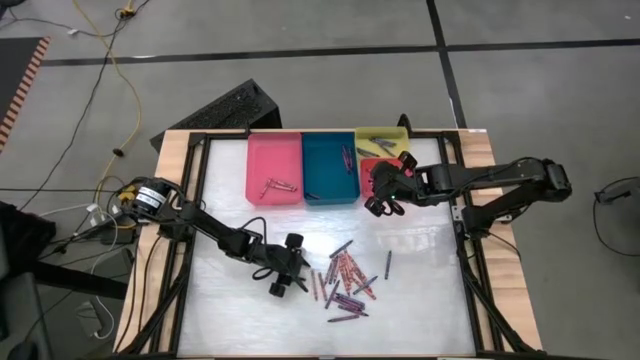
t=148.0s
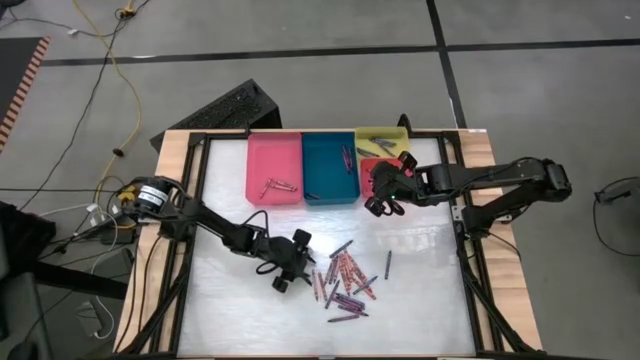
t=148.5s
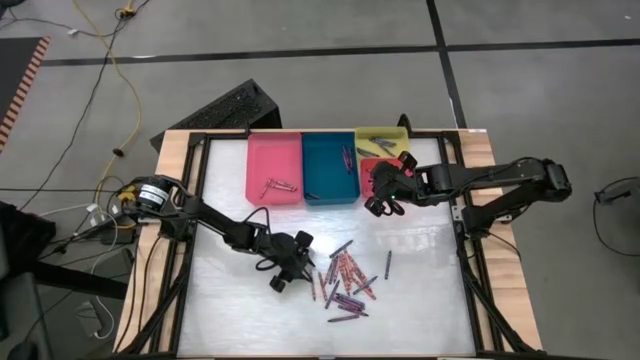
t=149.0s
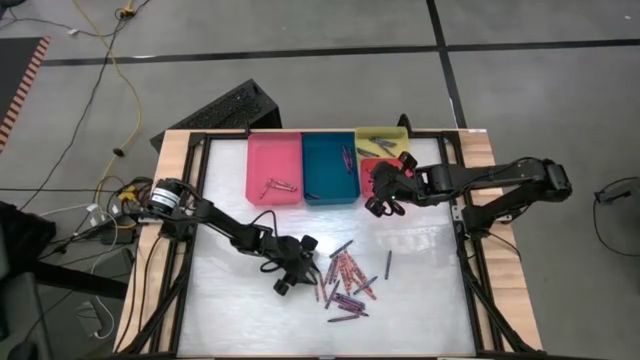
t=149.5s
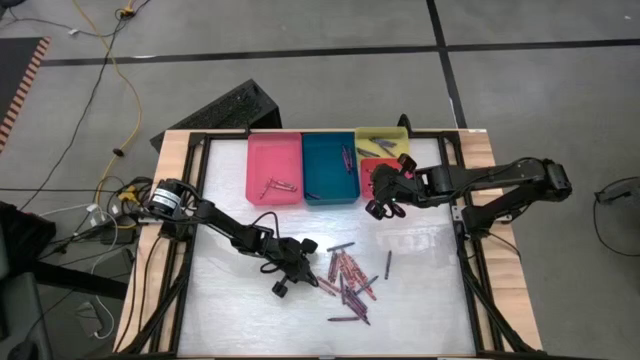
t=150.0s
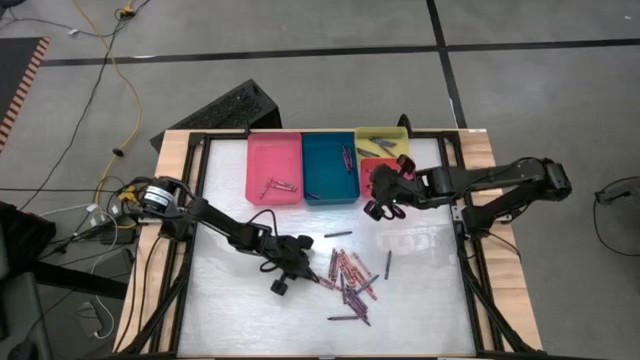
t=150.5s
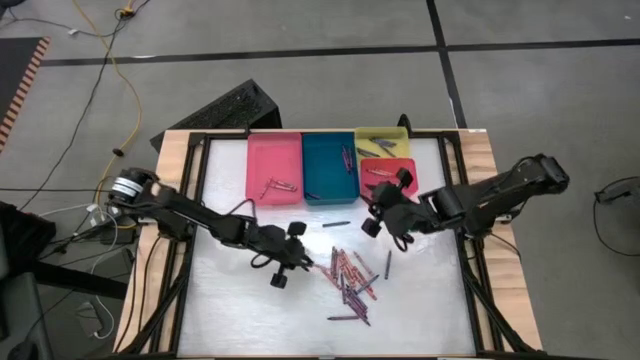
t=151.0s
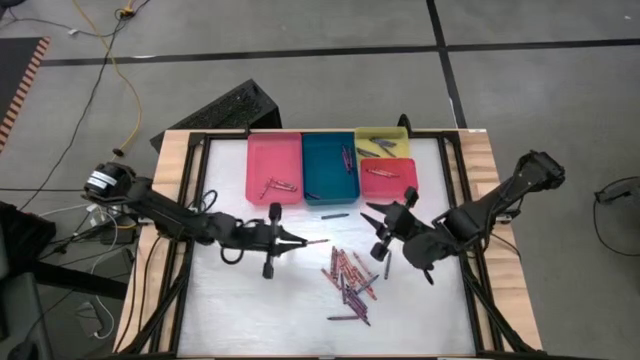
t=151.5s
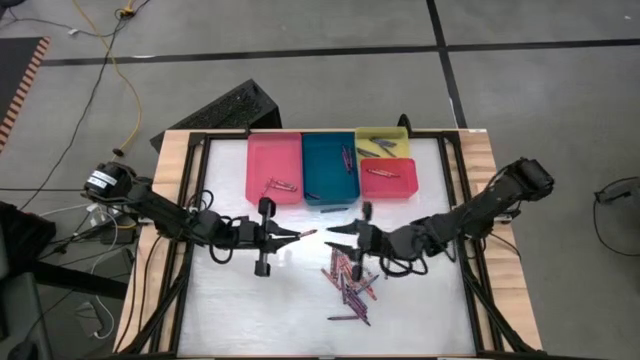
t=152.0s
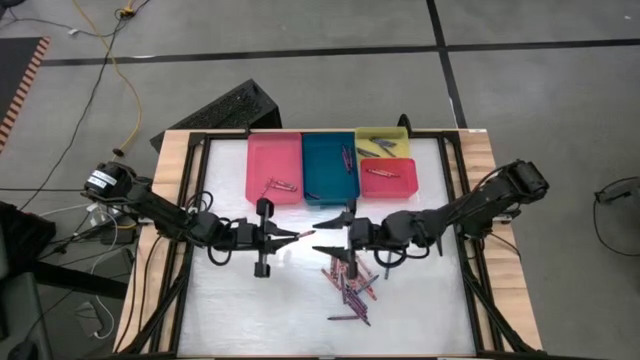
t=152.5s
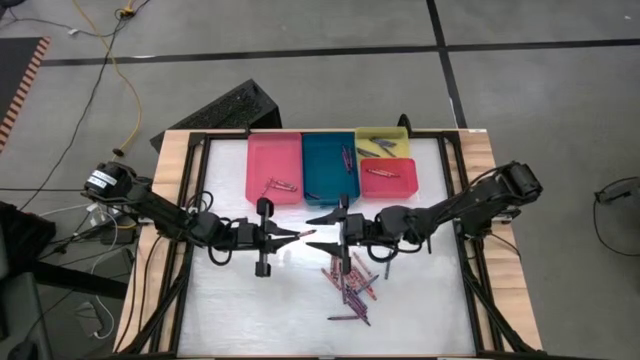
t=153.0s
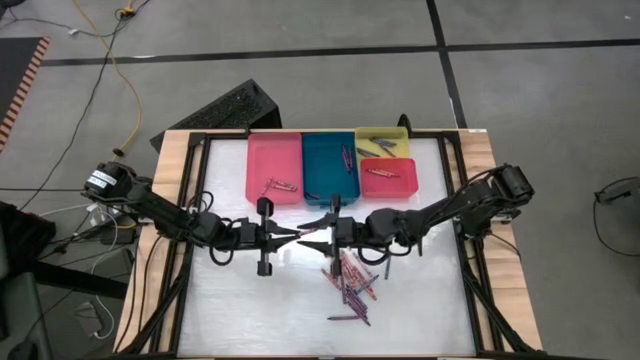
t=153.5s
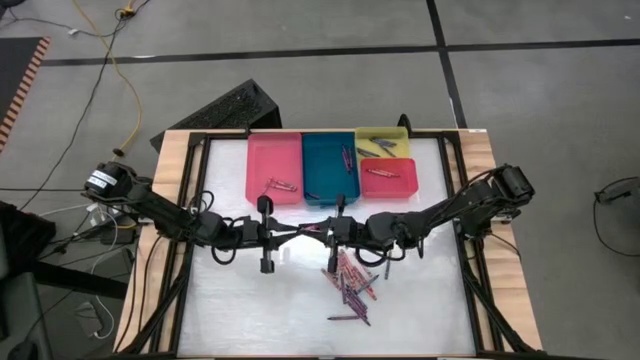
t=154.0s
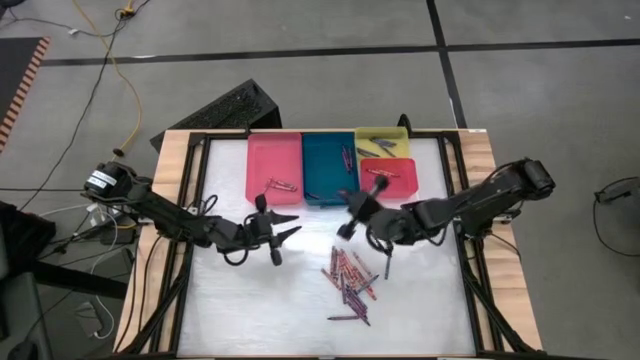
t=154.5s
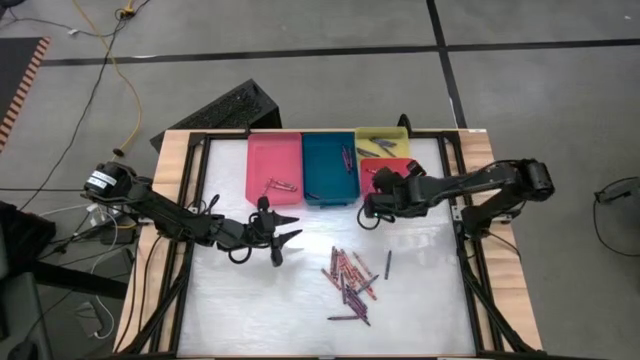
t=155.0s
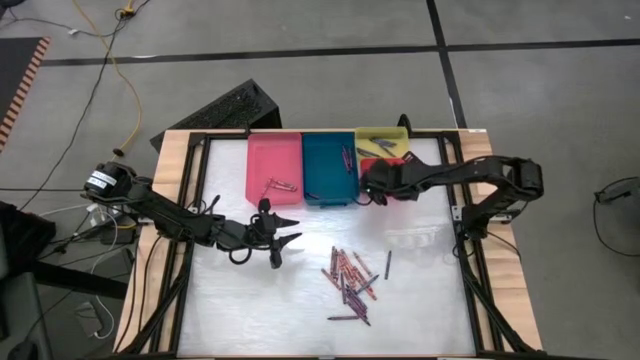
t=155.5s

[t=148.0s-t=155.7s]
Task: Sort crayons
Put the red crayon into the red bin

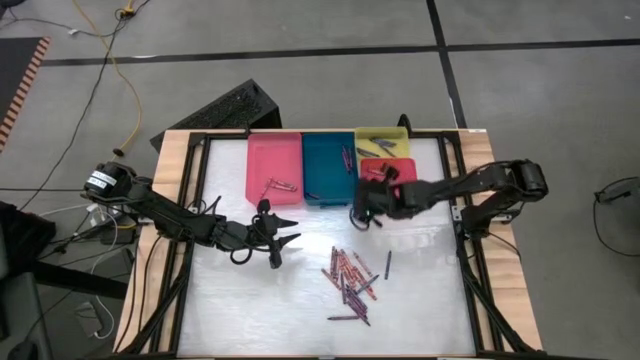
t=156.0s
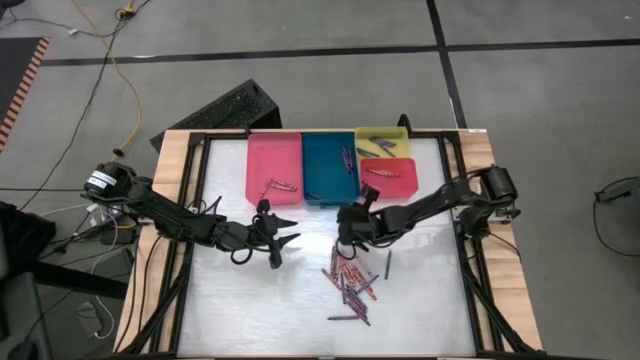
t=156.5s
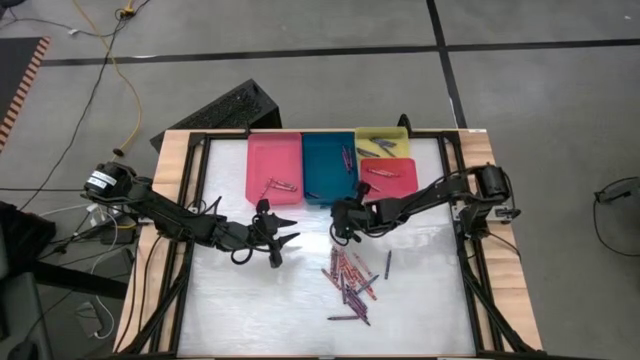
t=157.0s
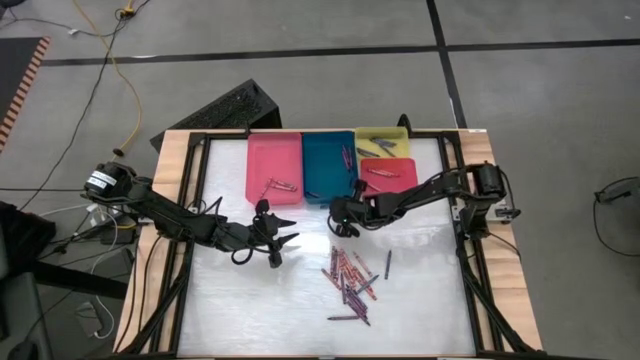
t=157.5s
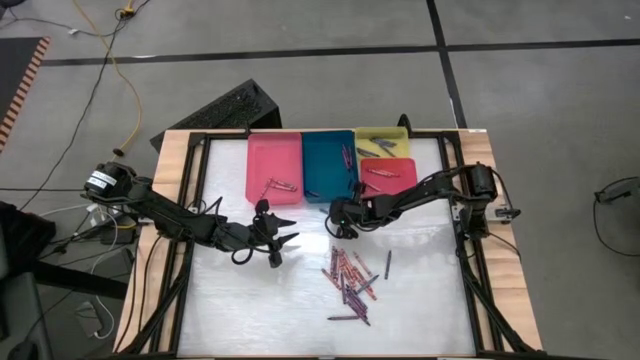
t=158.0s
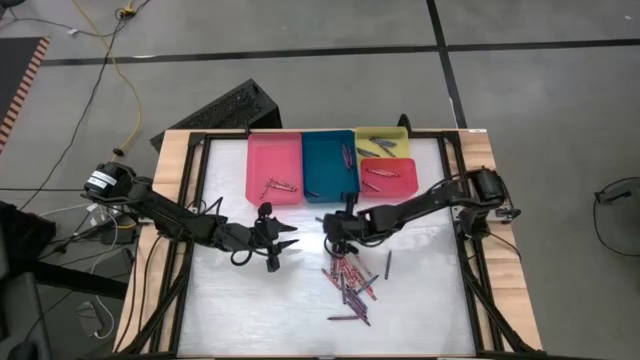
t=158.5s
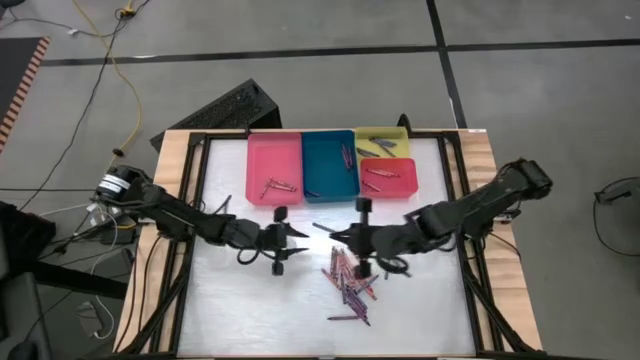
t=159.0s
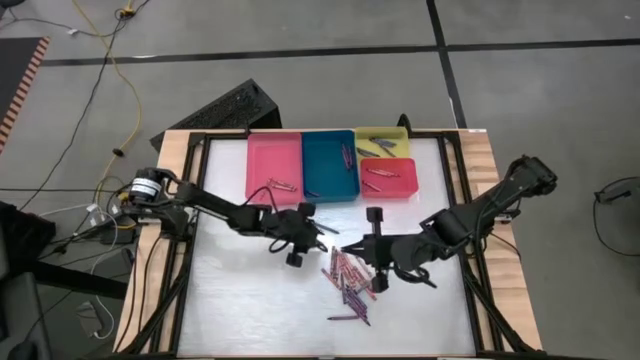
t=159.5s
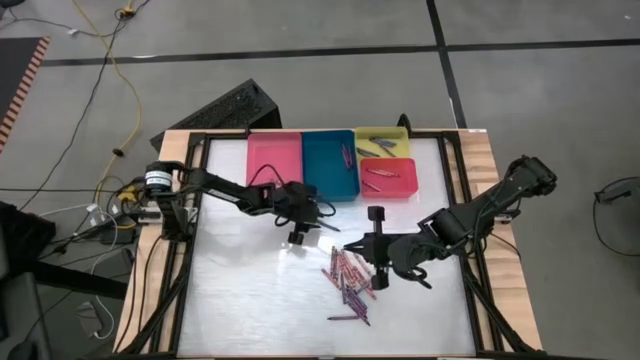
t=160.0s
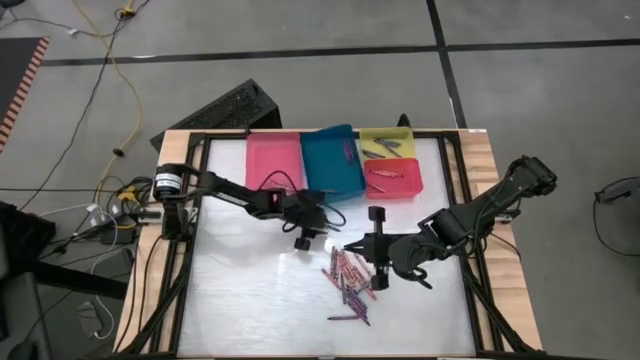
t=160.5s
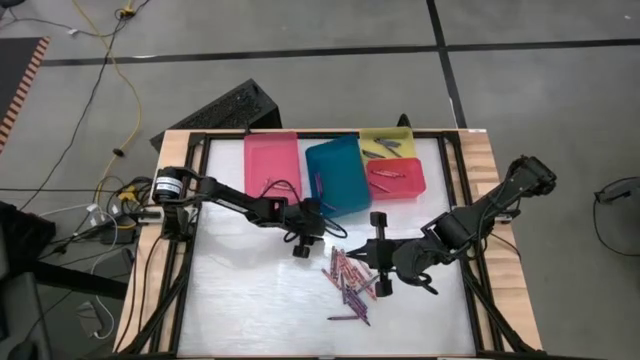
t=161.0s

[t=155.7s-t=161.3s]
Put the blue crayon into the yellow bin

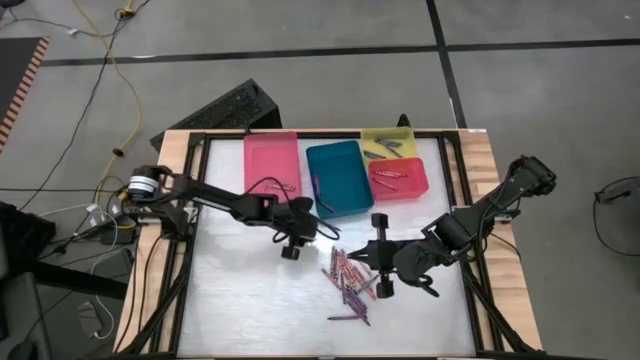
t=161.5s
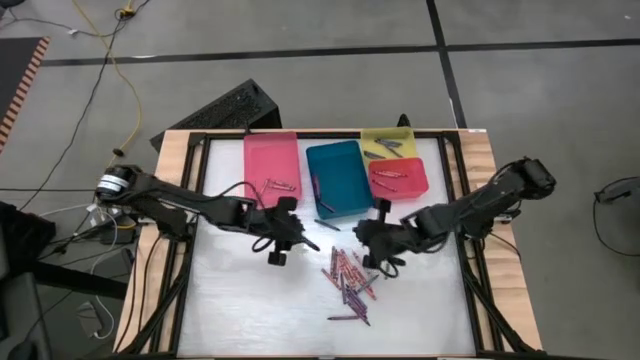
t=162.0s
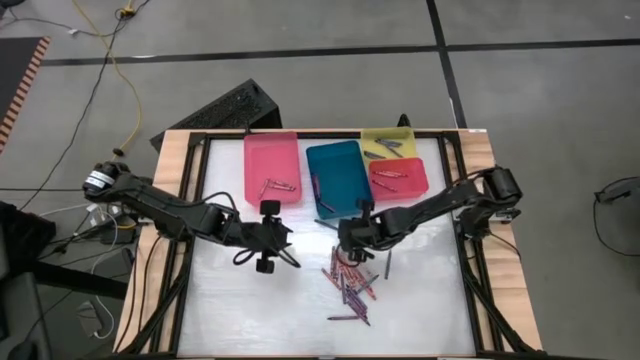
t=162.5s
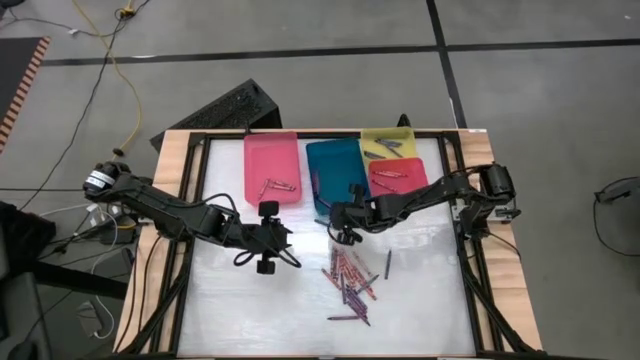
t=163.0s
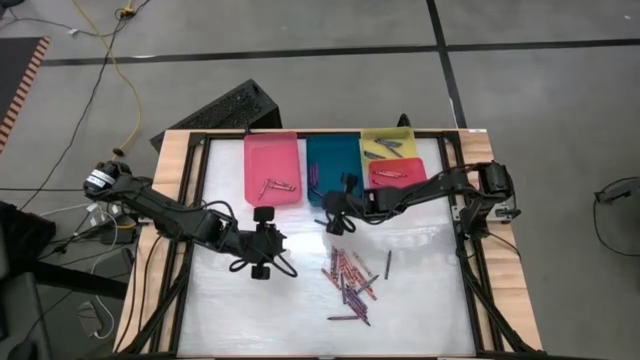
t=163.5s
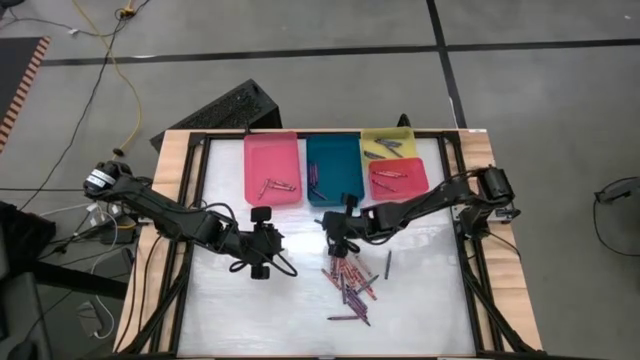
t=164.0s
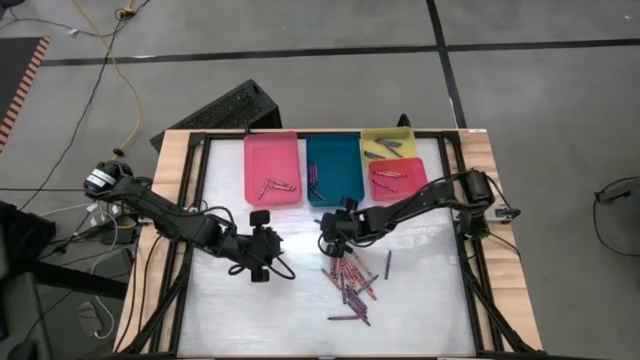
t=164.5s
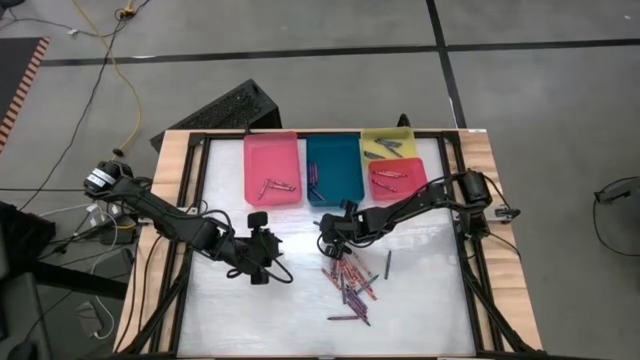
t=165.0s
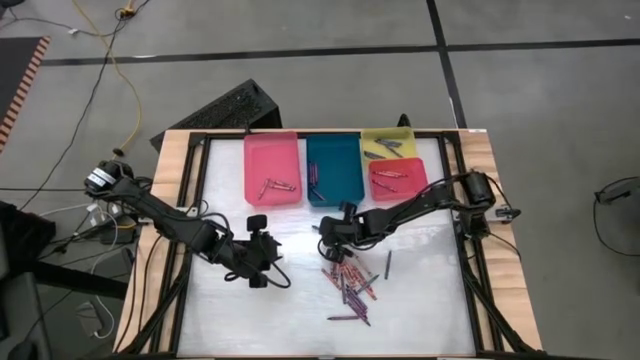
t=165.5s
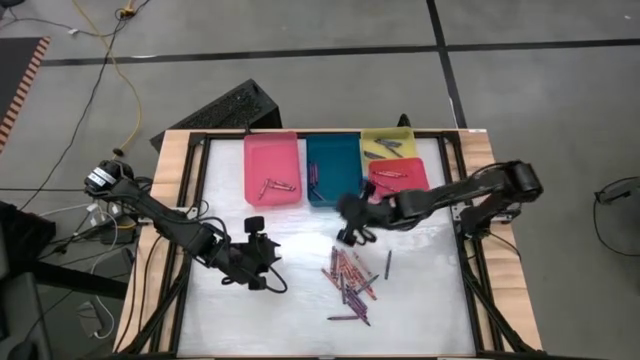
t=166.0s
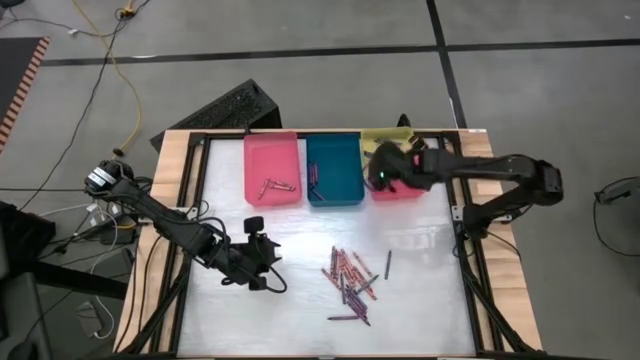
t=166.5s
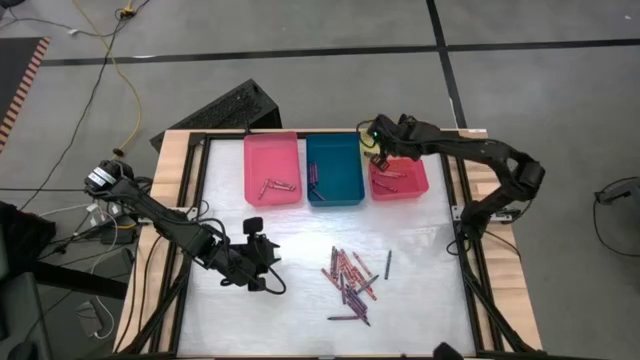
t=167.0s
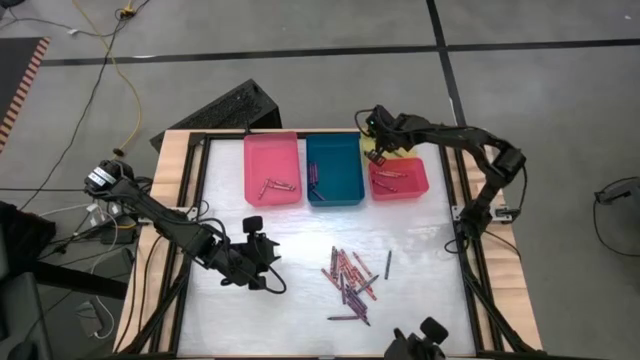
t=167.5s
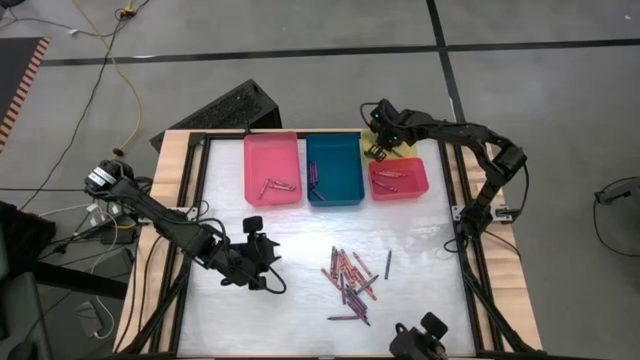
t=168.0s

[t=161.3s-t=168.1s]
Put the blue crayon into the yellow bin

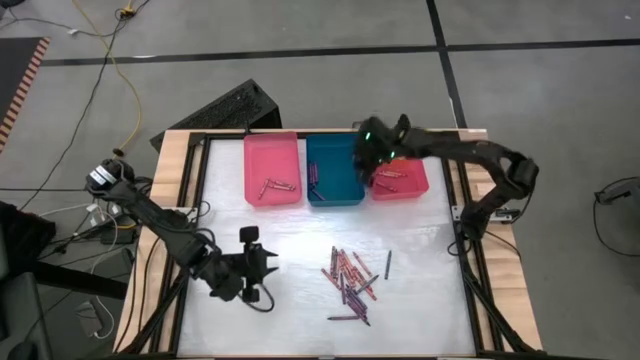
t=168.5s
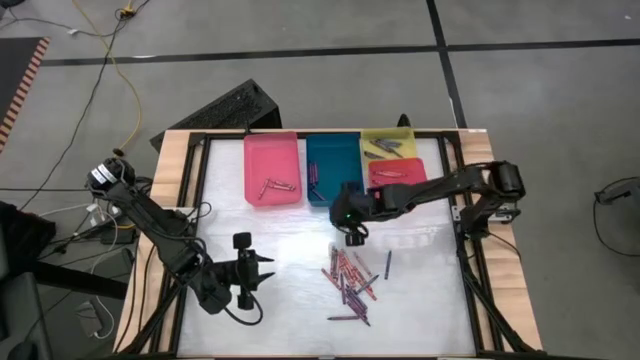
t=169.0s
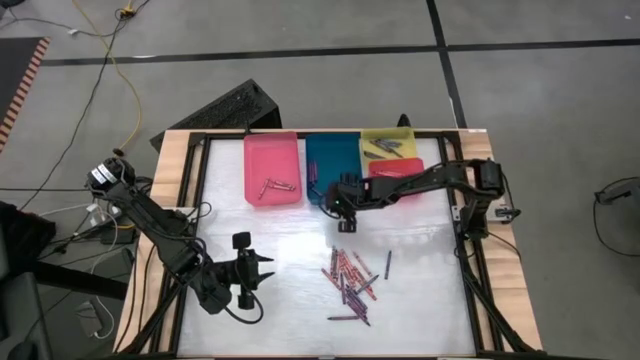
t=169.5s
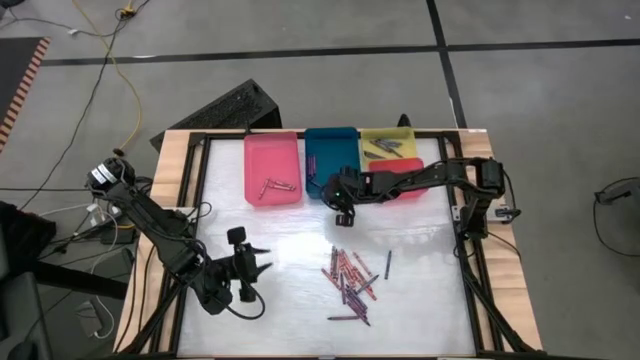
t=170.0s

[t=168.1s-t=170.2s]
Adjust the blue bin
